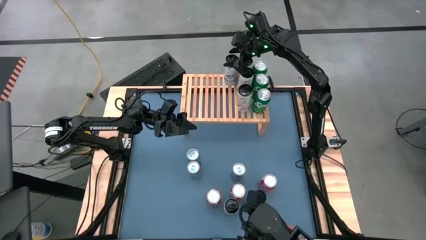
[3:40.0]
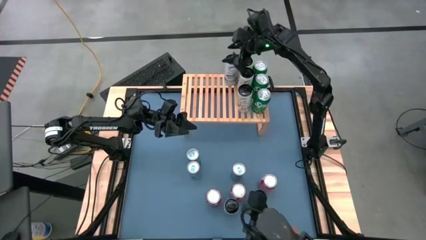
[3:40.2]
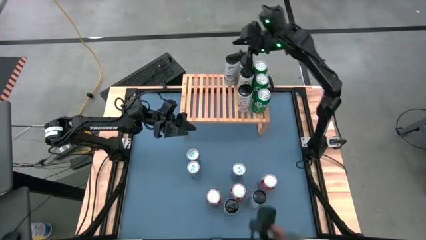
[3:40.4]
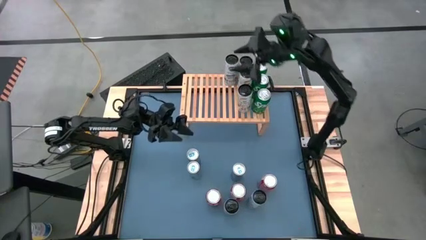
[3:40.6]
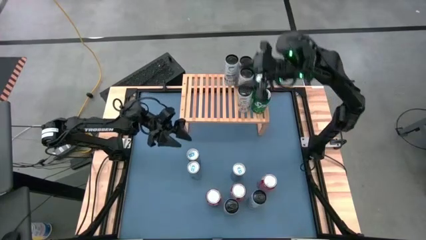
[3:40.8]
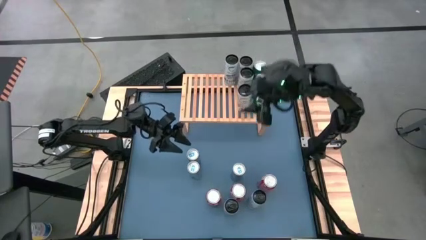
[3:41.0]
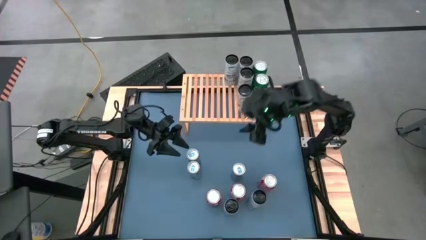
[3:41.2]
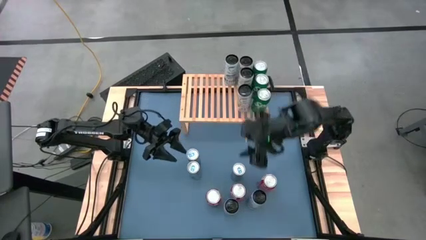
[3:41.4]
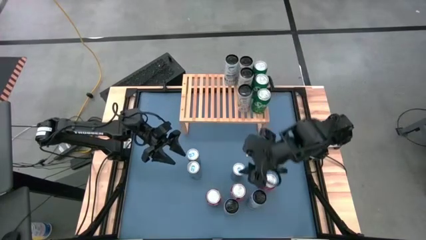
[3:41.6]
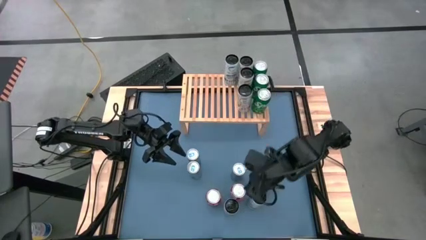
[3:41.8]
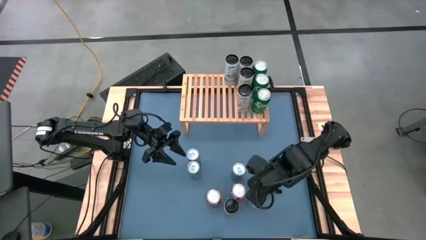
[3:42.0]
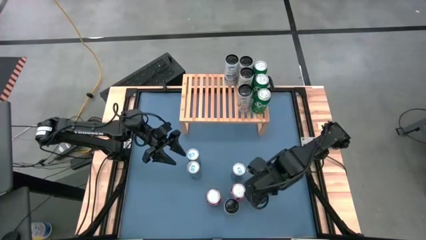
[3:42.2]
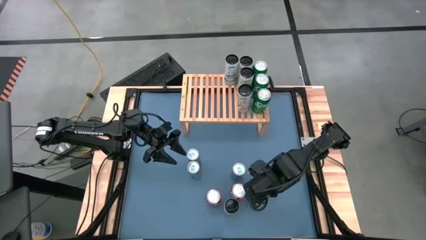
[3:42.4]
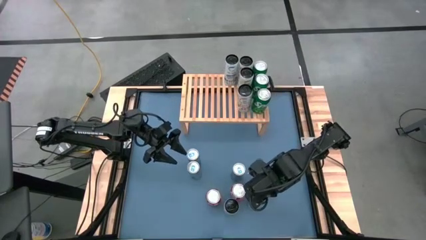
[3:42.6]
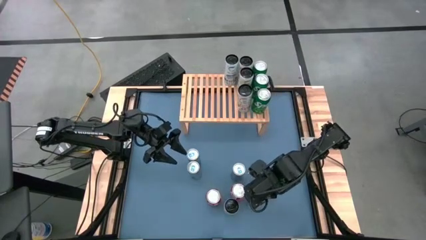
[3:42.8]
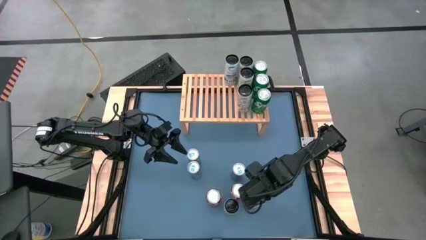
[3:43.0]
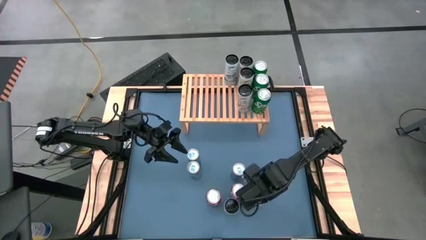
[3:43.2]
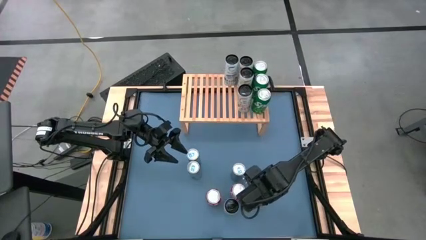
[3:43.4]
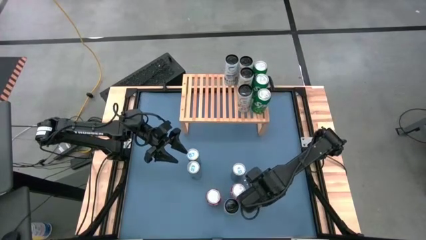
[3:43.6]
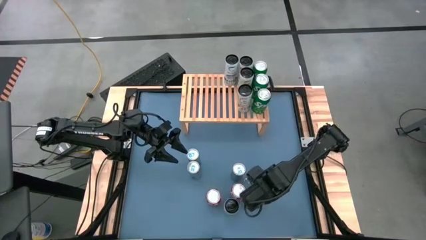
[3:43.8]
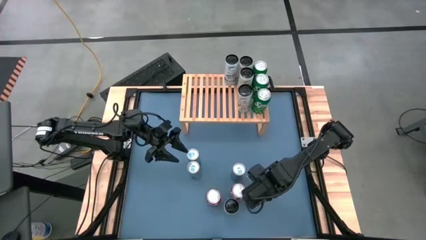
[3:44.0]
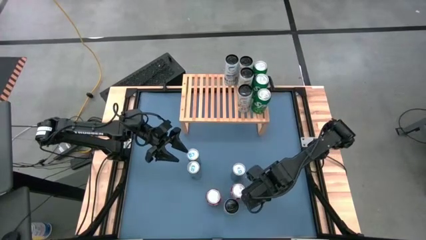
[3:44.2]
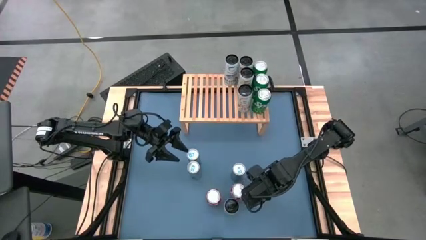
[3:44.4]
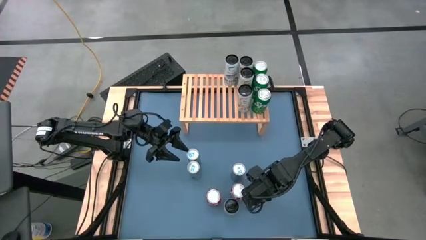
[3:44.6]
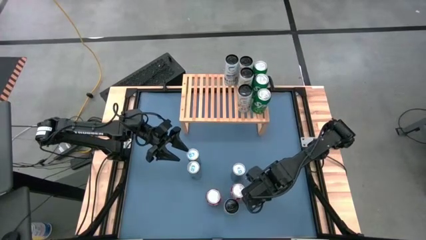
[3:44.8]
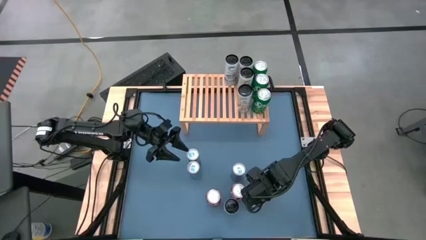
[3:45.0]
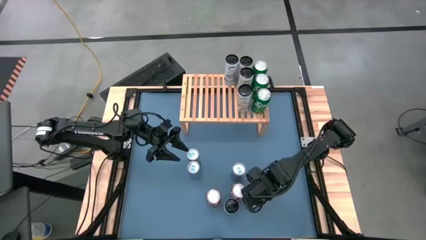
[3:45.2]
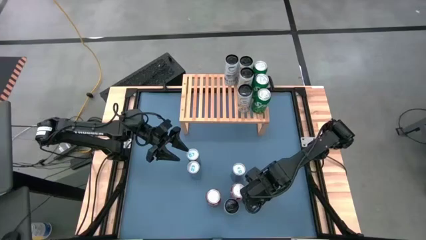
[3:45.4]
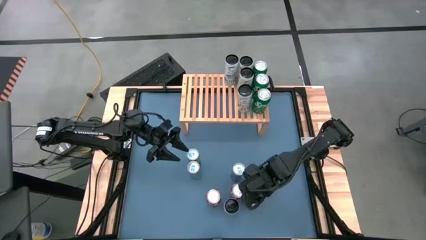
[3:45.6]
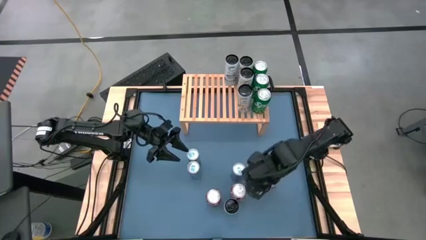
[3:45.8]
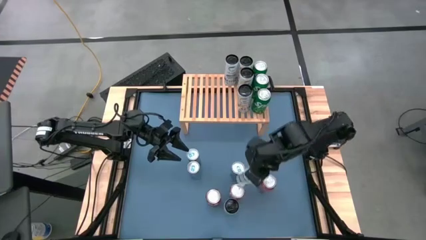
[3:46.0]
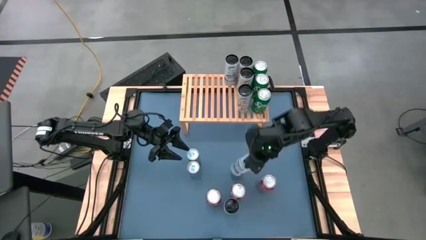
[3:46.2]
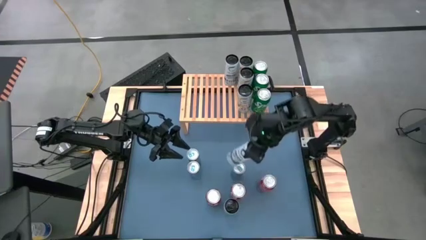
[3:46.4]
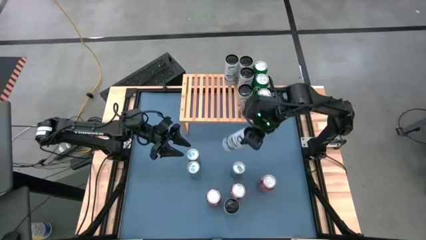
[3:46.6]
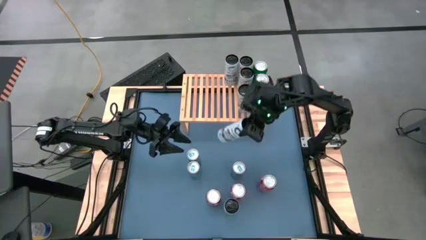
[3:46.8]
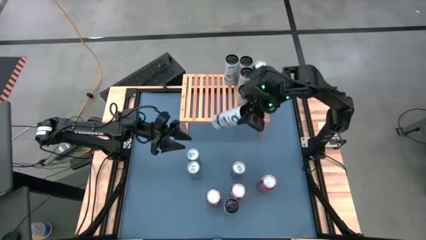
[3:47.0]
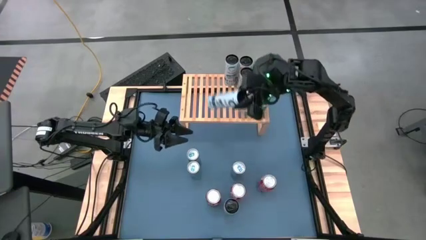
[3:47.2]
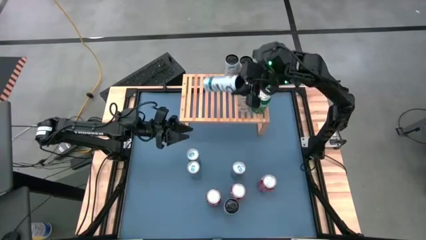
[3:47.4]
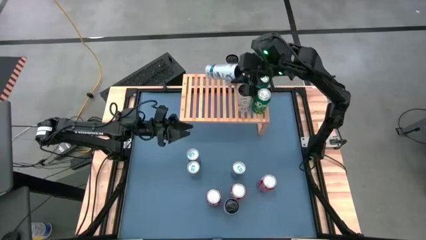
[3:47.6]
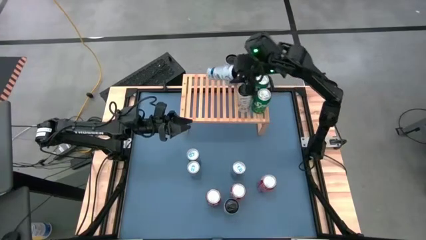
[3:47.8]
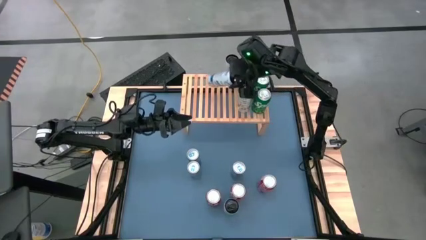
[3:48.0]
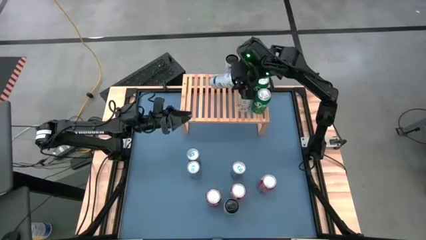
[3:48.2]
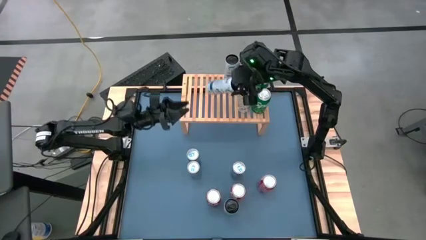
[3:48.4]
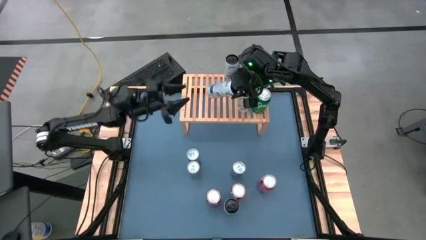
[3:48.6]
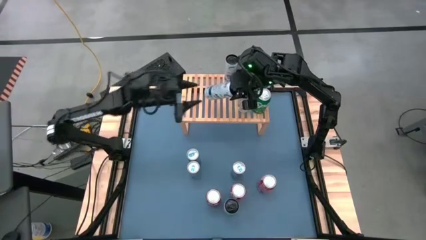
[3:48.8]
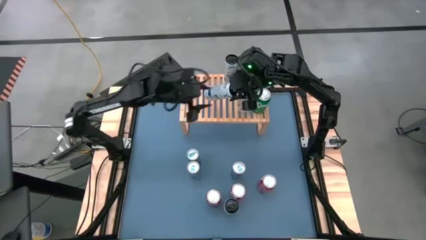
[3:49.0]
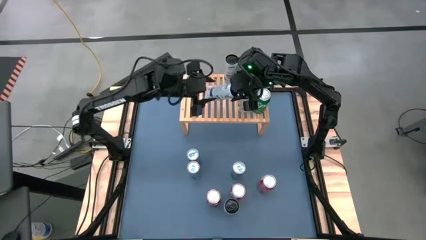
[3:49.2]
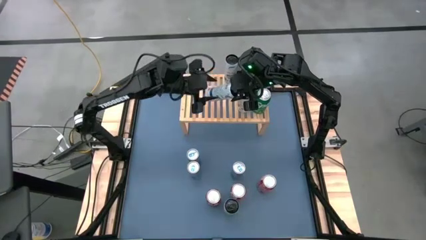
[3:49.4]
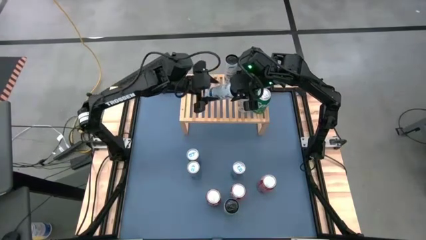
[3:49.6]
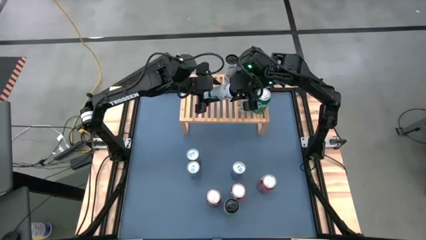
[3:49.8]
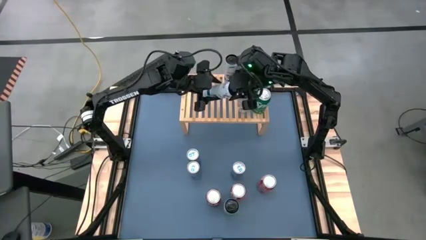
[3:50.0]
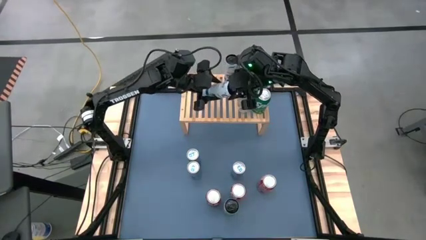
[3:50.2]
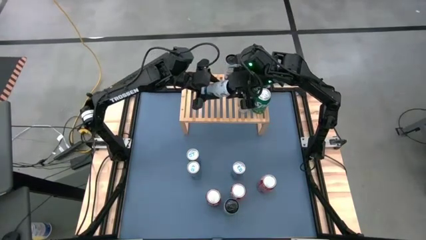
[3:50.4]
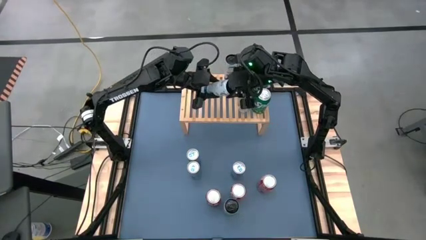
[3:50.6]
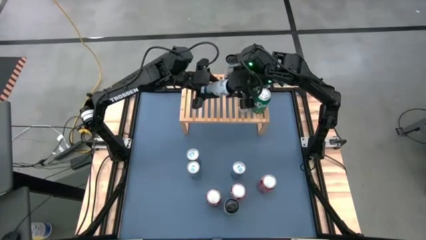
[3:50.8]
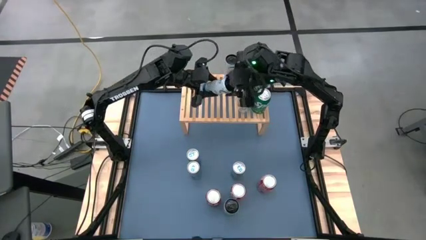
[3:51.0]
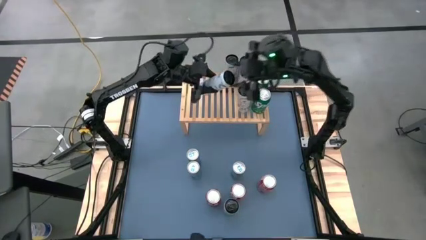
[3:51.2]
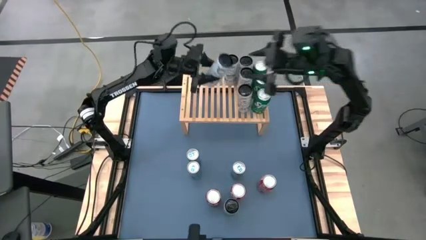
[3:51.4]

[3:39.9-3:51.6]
Task: Place canned beverage on shelf
Put the right white-blue soda can on the shelf aligned with the other white-blue soda can

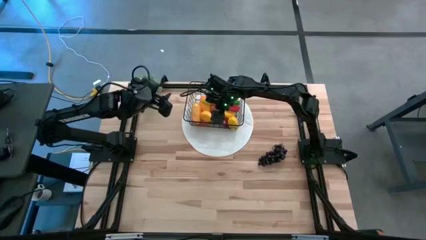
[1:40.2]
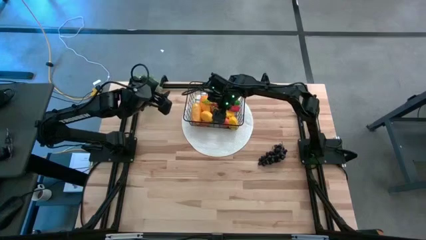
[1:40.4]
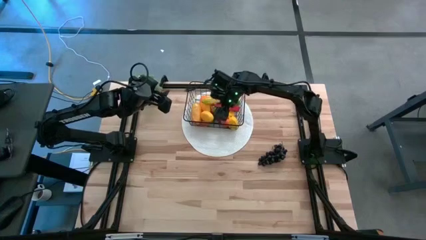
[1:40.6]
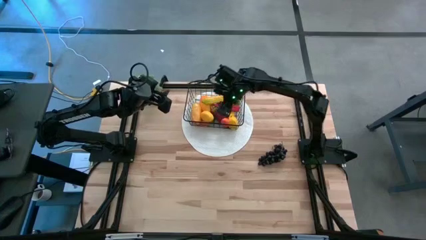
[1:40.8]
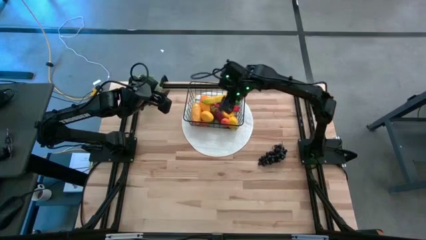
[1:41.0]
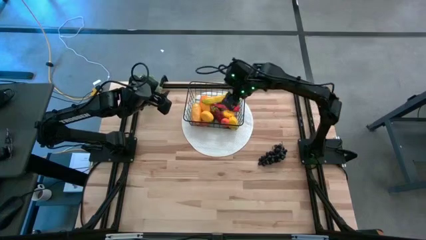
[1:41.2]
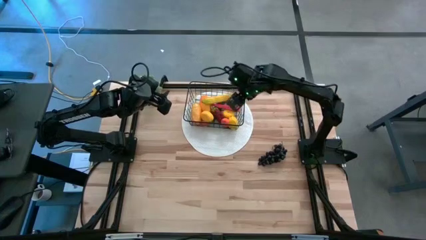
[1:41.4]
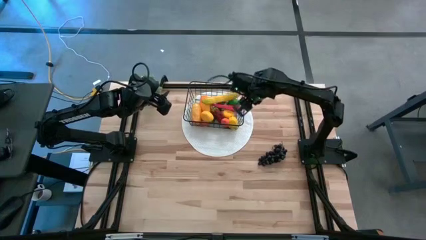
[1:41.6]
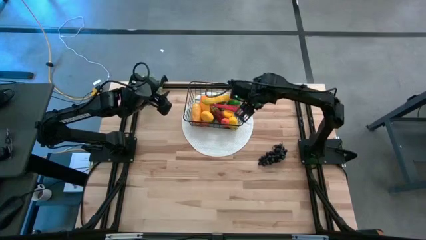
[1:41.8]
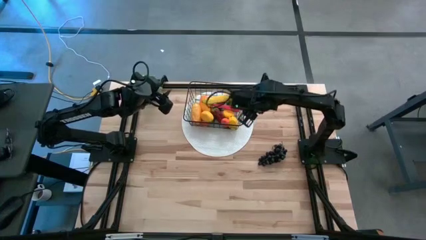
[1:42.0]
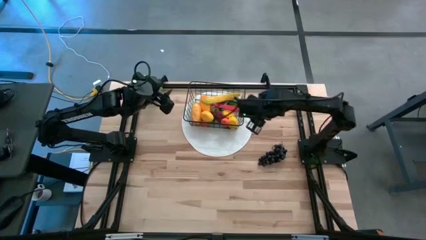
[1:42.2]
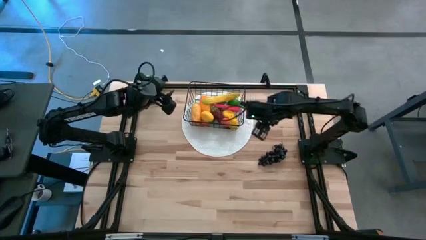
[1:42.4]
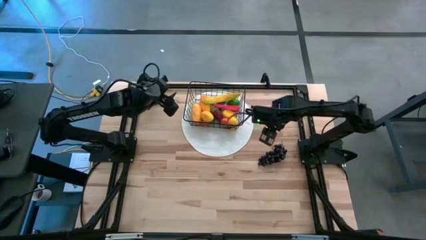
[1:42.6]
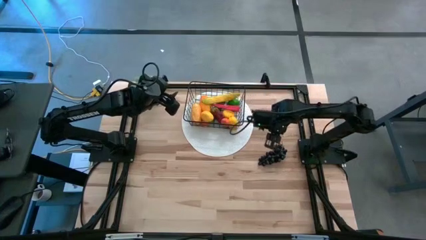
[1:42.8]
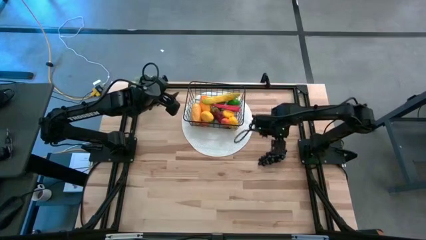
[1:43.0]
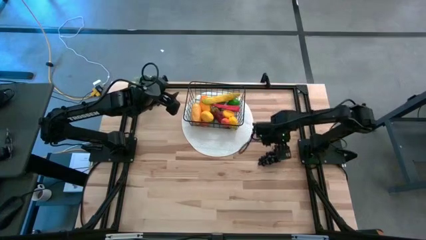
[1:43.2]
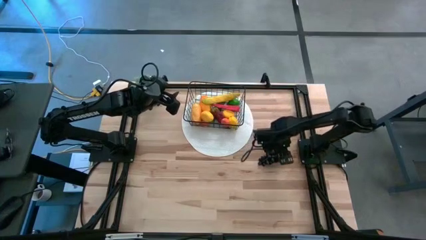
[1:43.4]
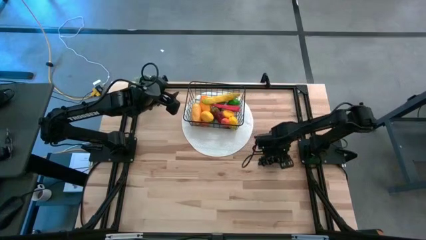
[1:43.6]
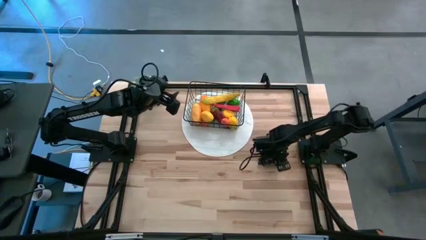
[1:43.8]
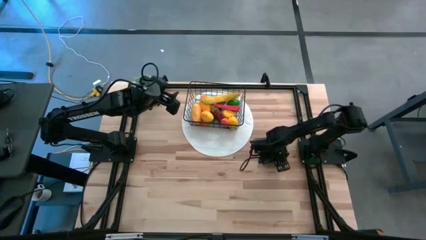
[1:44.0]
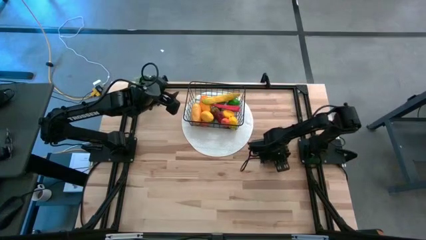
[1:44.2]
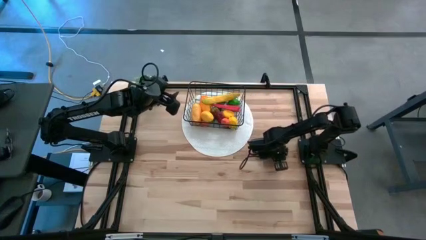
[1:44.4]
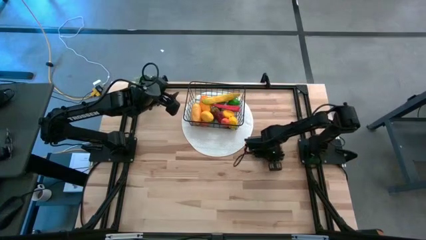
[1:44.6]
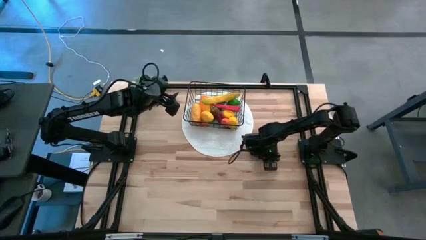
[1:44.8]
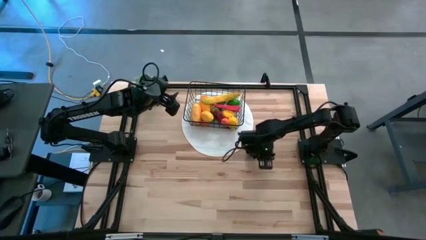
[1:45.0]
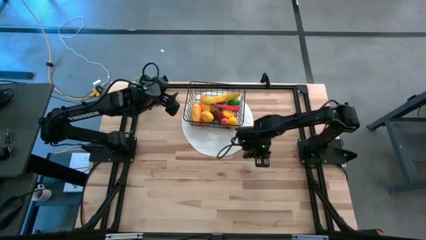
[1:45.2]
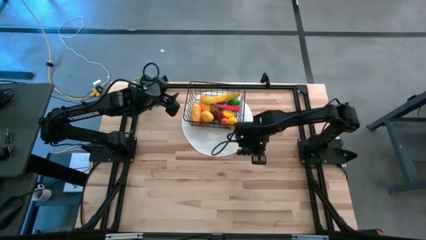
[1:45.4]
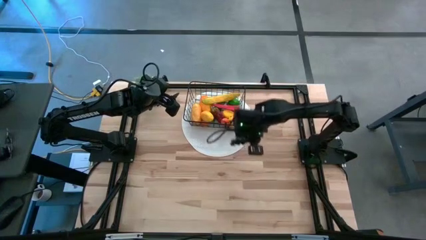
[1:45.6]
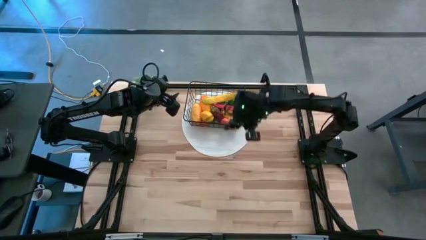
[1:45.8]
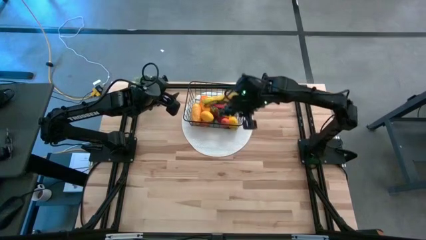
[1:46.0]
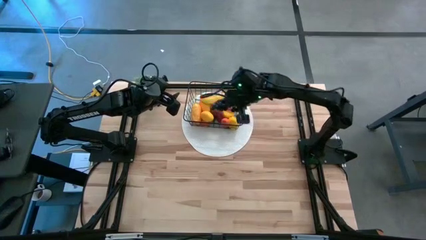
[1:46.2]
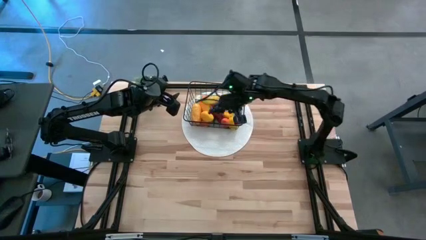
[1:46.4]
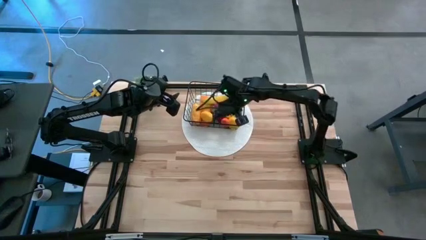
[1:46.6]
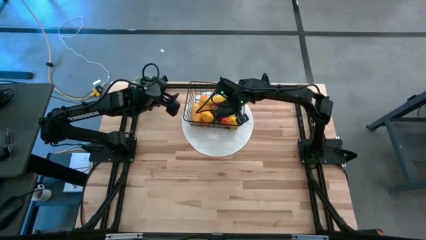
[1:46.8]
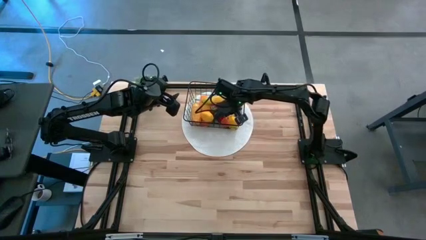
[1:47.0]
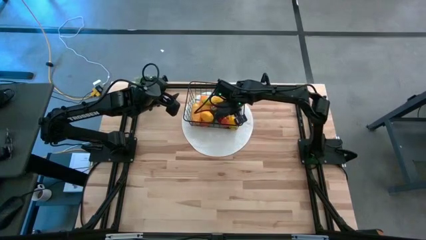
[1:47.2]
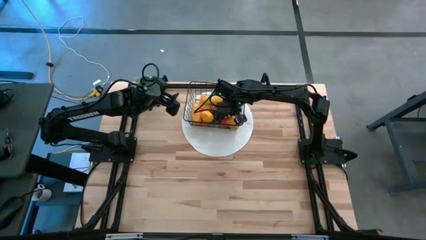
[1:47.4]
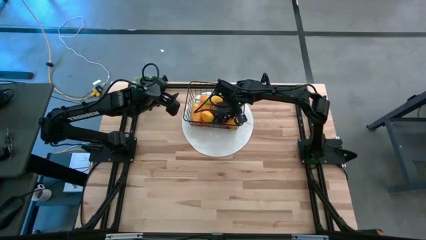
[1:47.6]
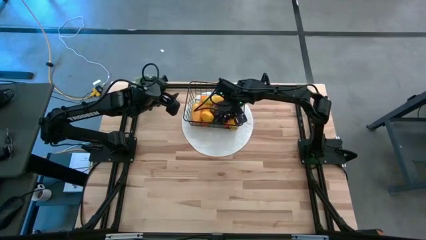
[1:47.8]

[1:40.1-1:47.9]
Task: Build produce basket
Put the grapes into the wire basket
